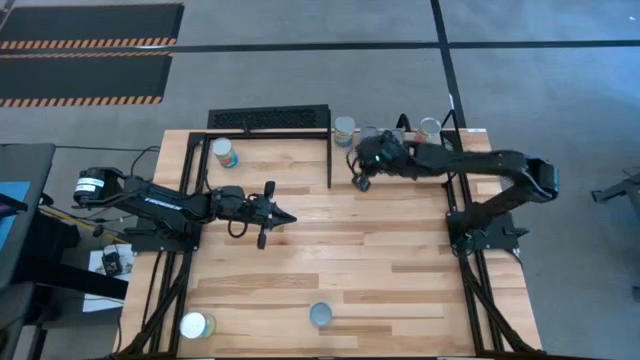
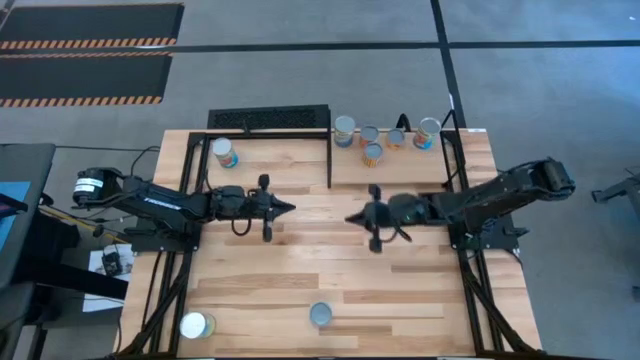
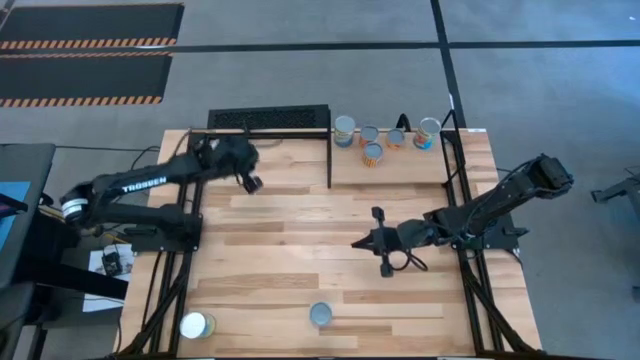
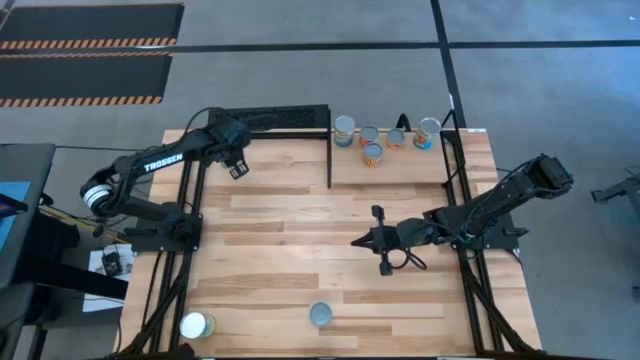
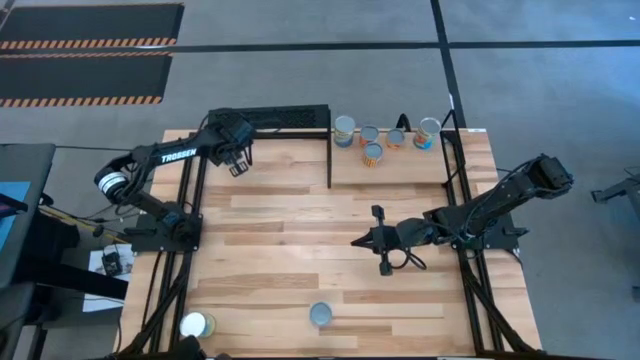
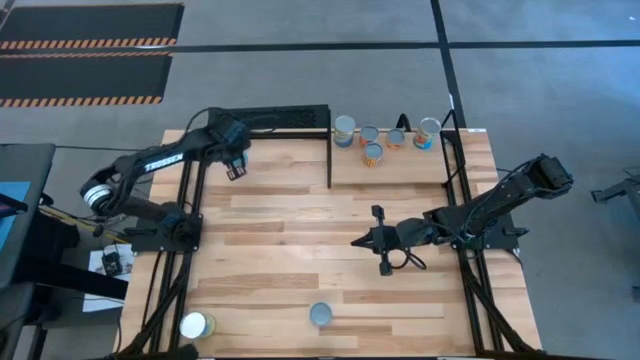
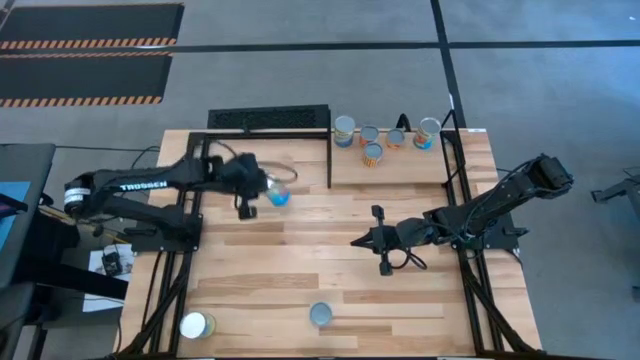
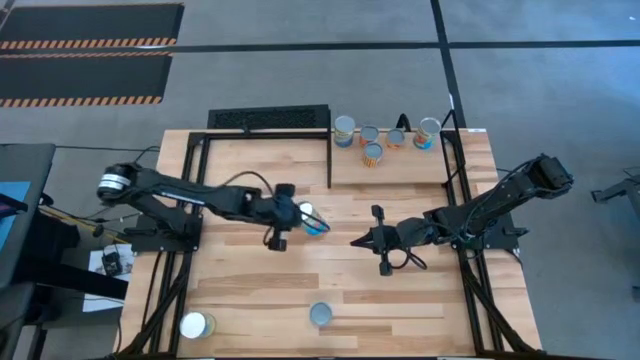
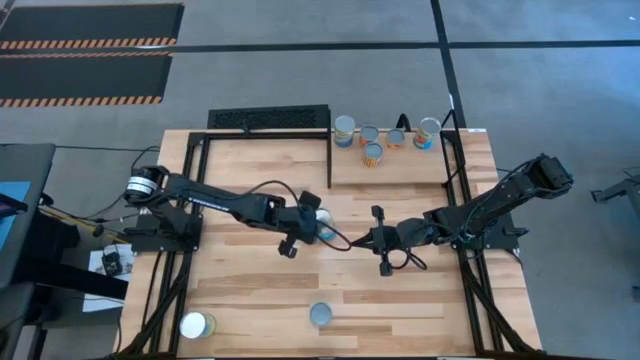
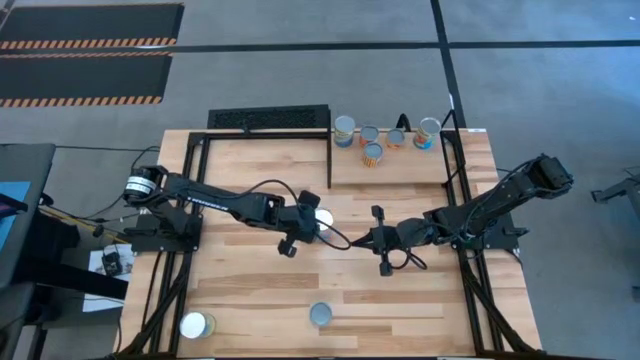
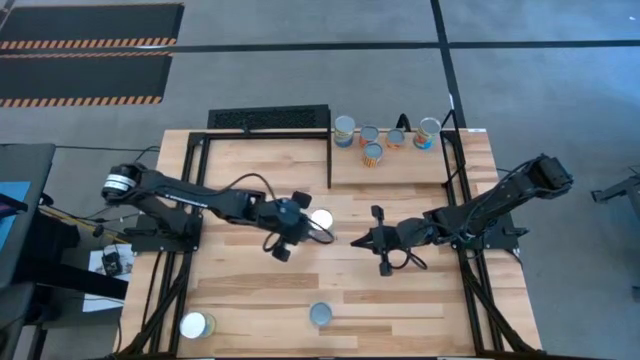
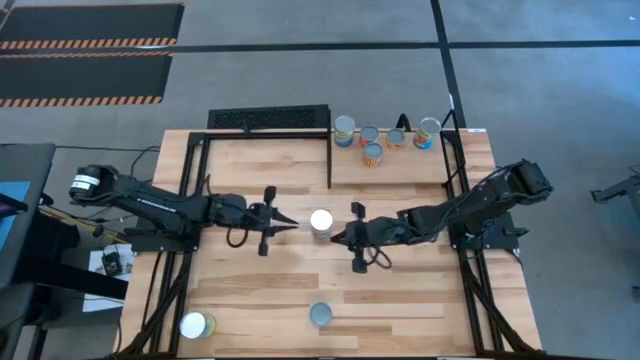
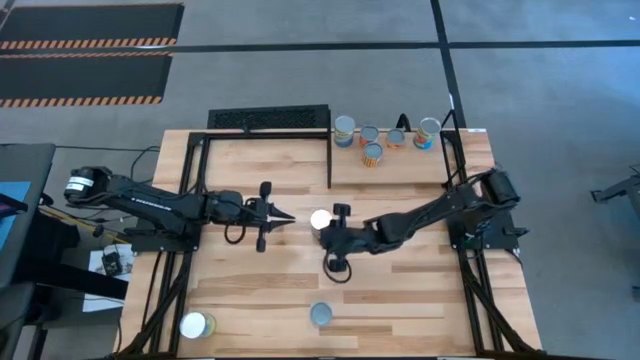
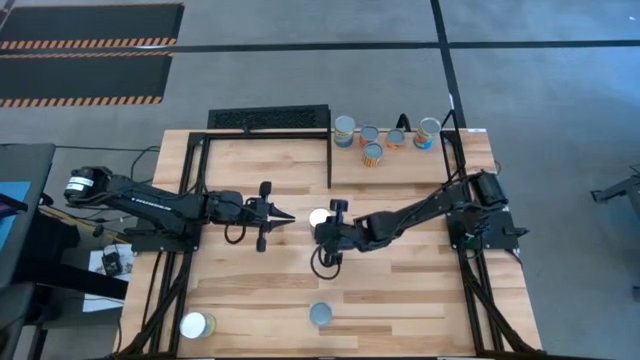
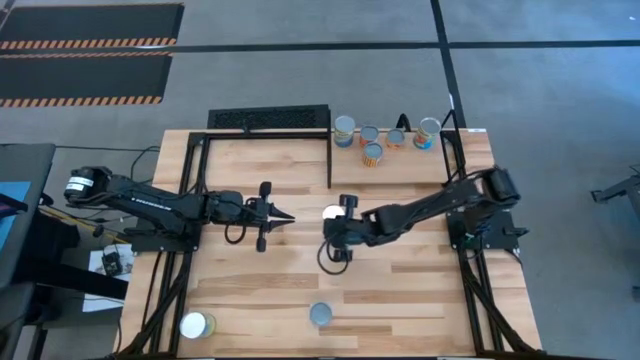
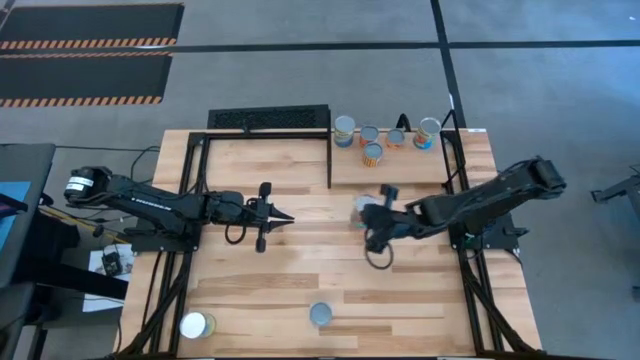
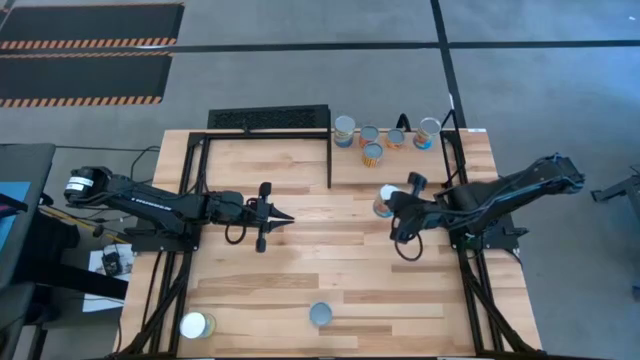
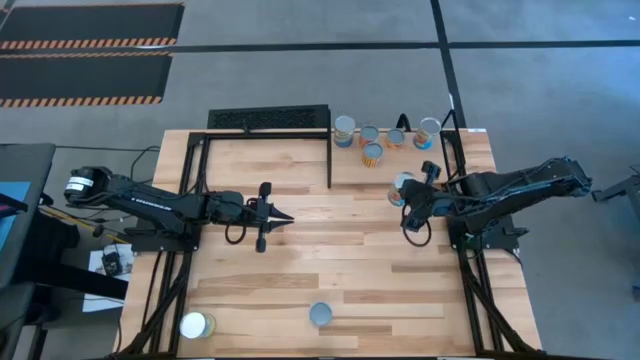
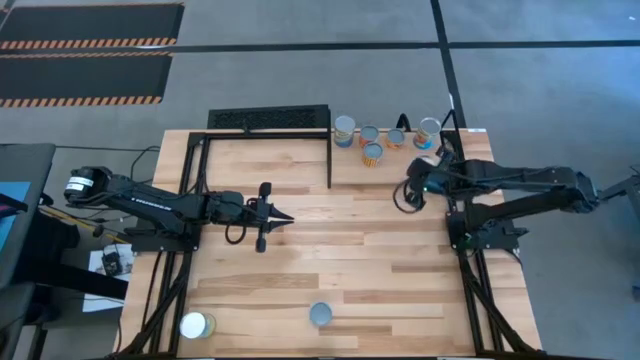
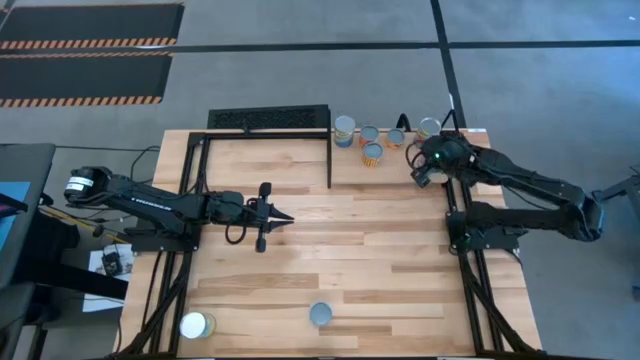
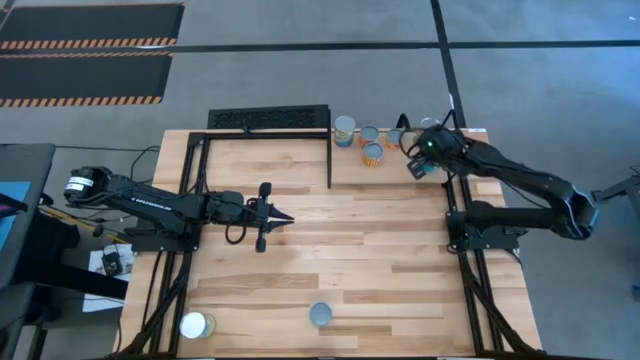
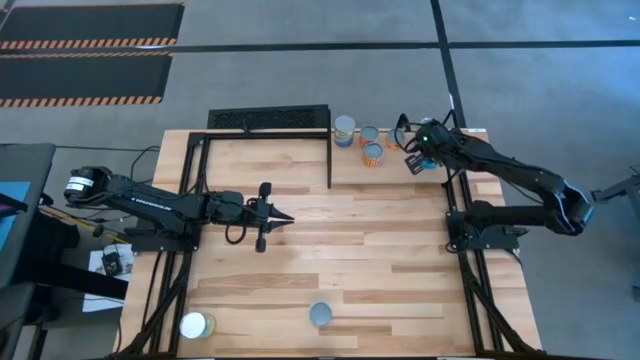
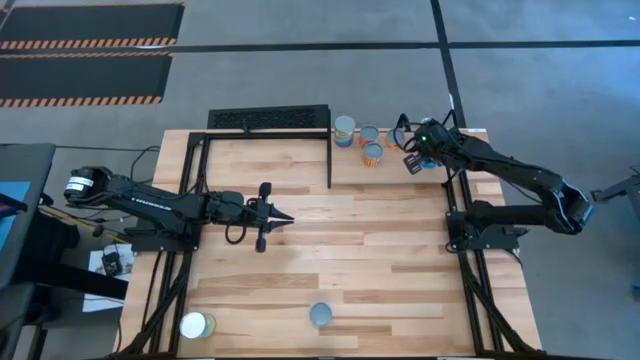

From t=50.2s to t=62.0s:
Task: Pick and place cans onto a shelf
Align the canned tomatoes with the other canned tomatoes on the shelf

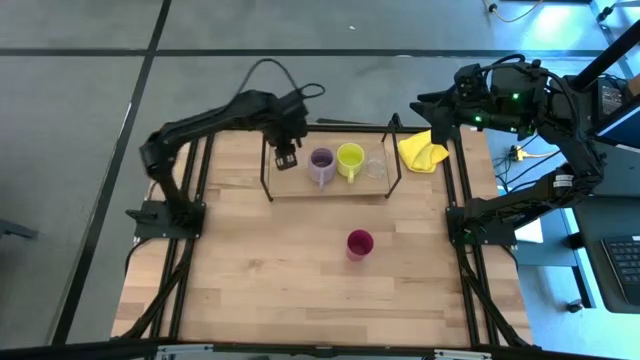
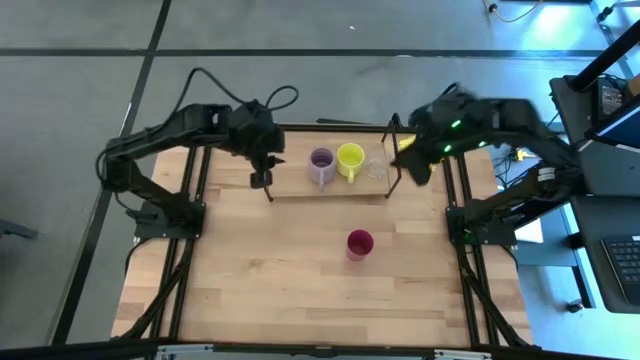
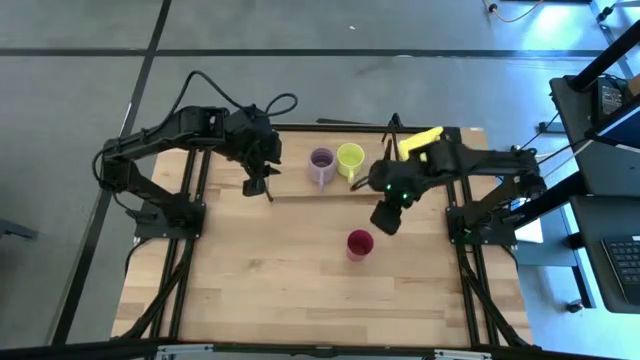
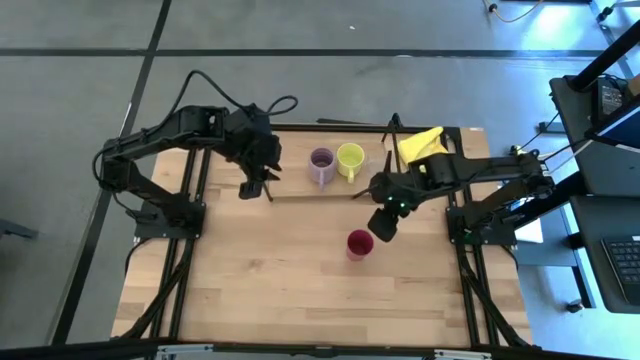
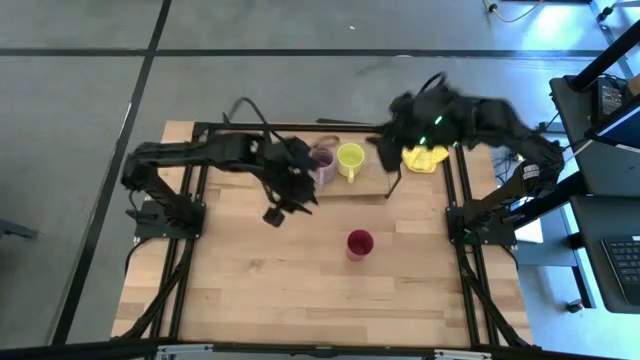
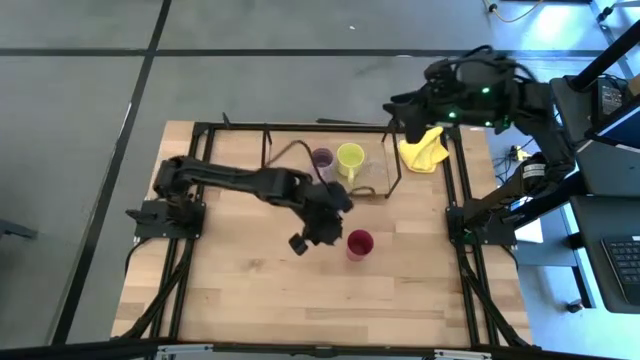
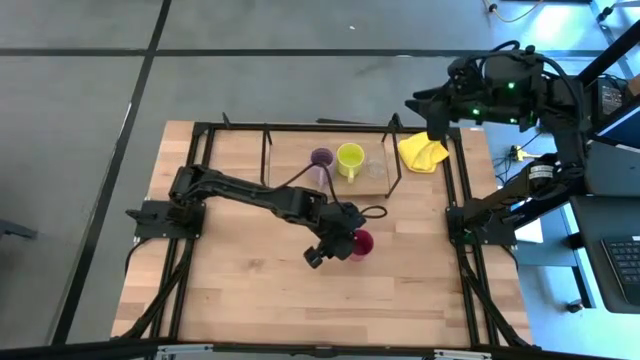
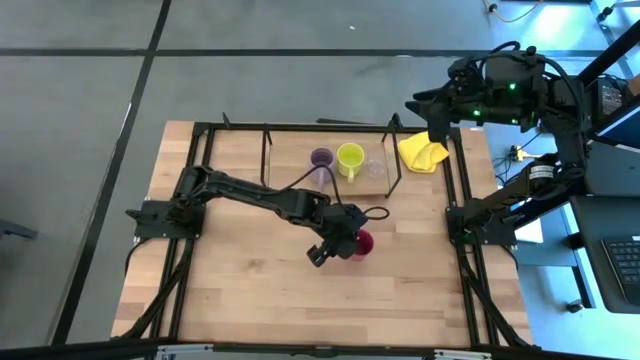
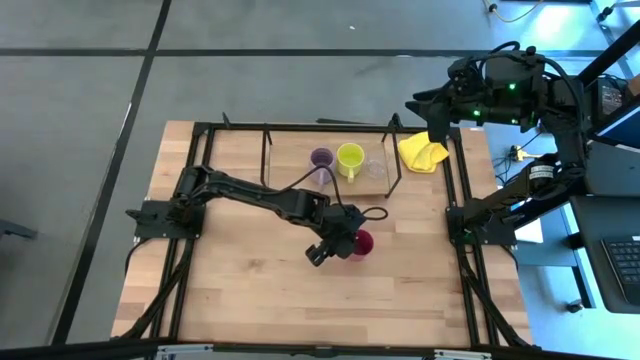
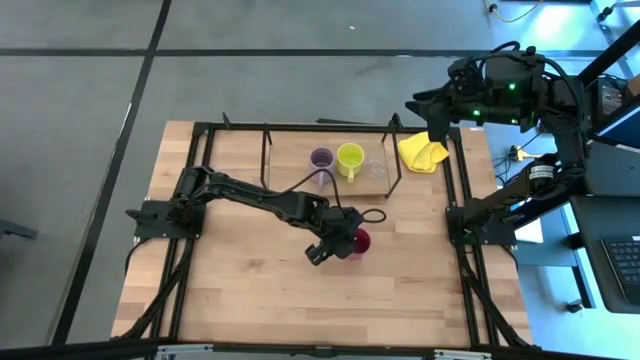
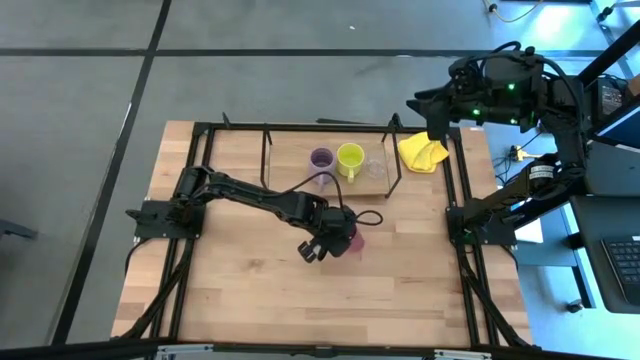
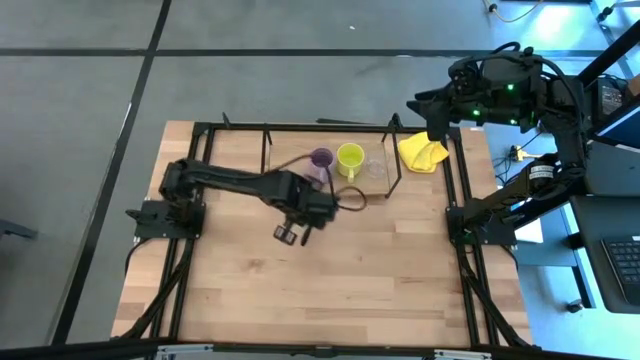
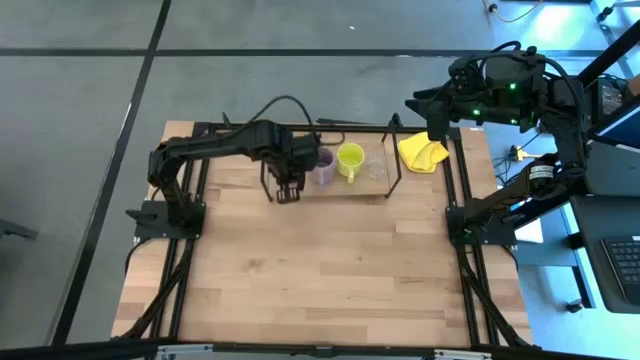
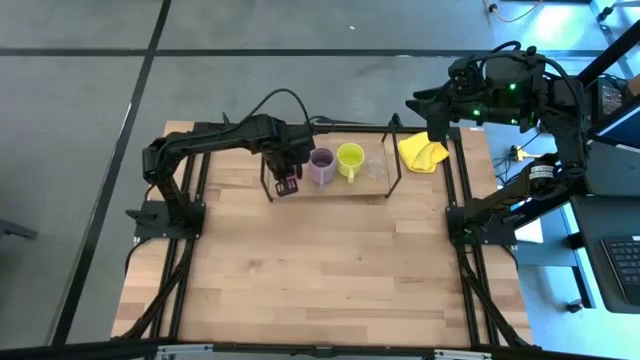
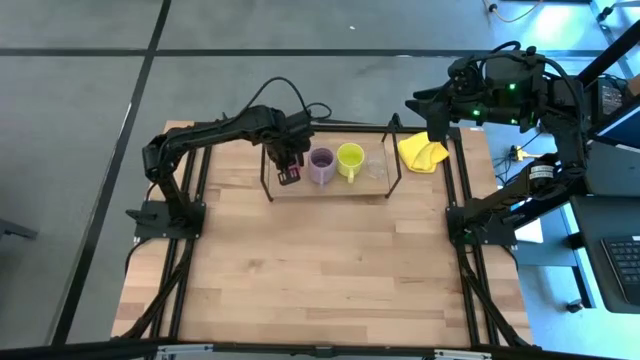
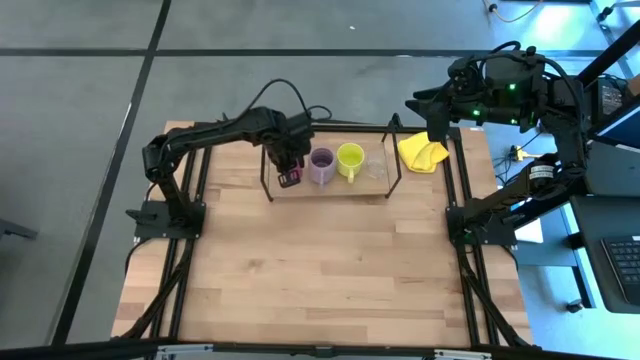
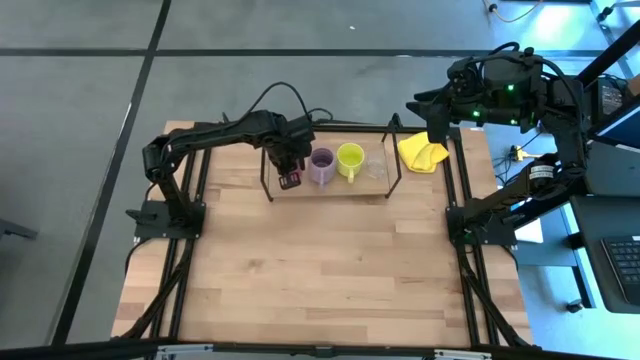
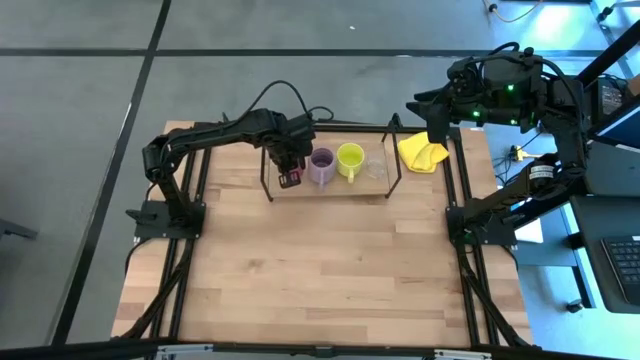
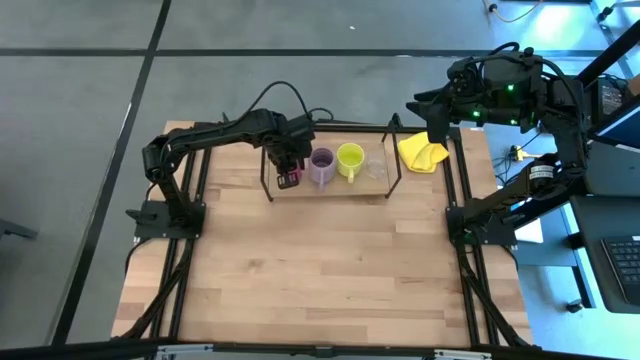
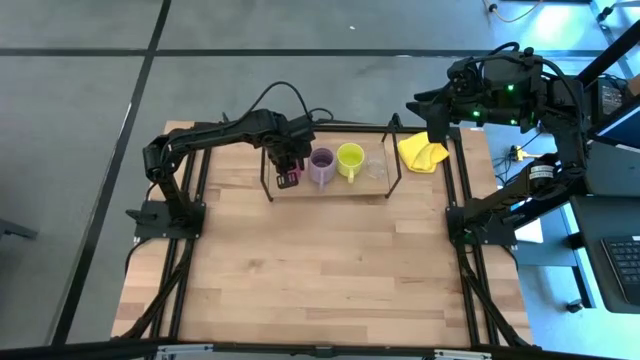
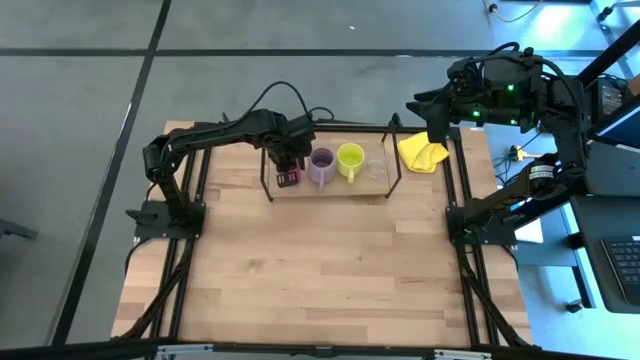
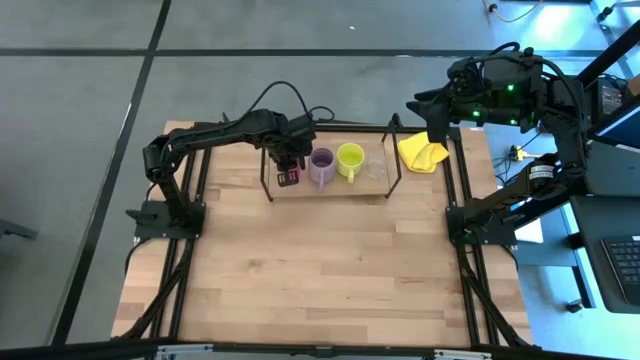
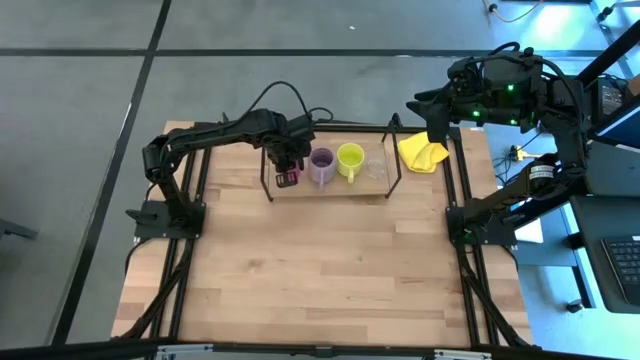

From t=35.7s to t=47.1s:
Task: Stack small to large cups/mugs on shelf
Put the red cup on the shelf
